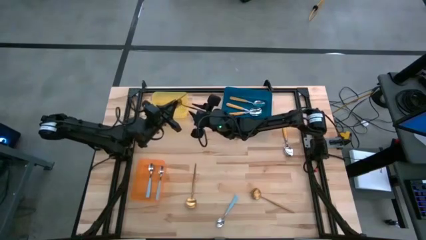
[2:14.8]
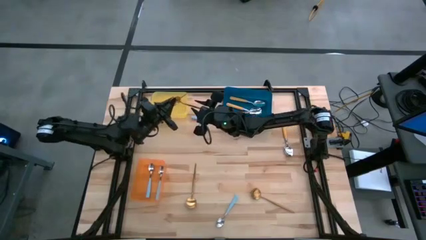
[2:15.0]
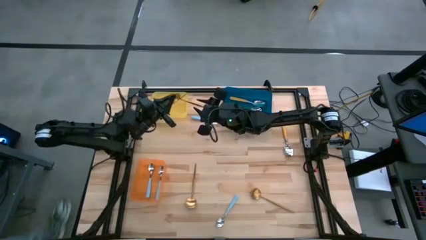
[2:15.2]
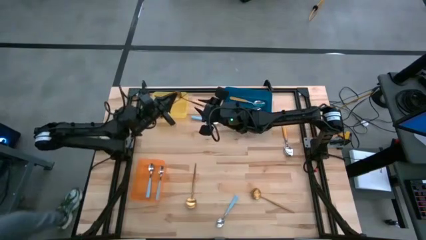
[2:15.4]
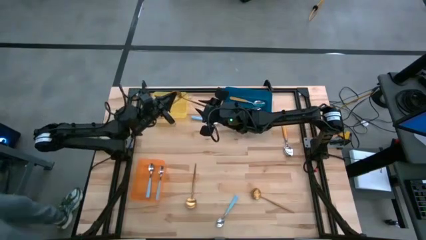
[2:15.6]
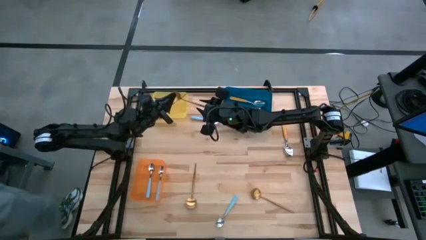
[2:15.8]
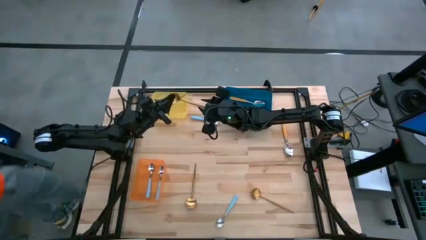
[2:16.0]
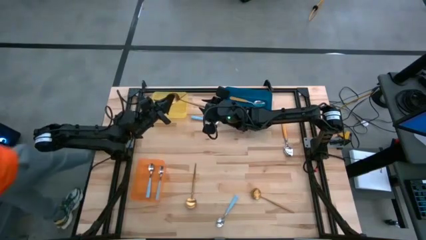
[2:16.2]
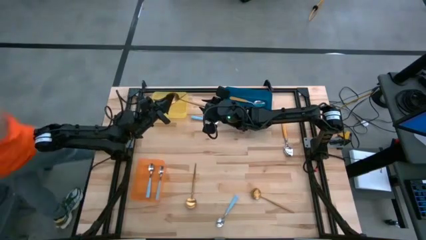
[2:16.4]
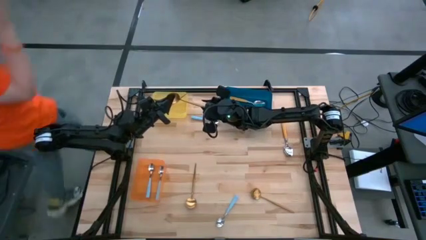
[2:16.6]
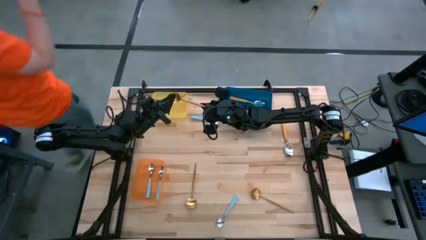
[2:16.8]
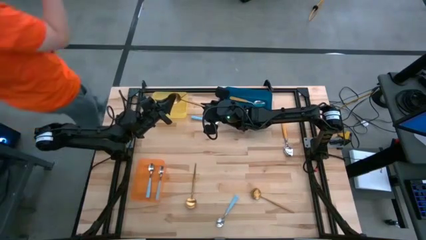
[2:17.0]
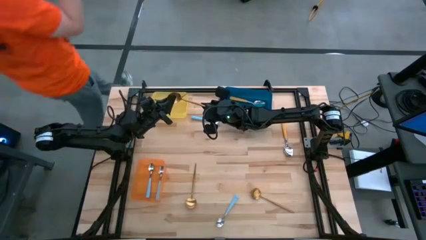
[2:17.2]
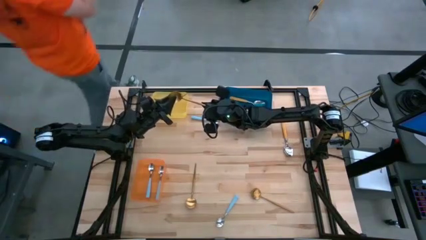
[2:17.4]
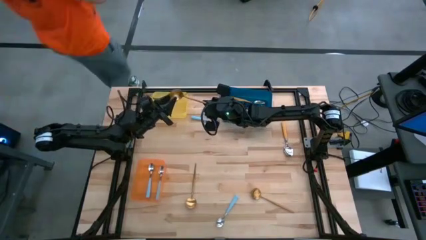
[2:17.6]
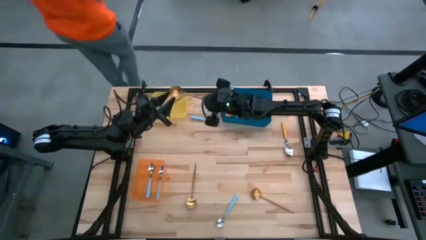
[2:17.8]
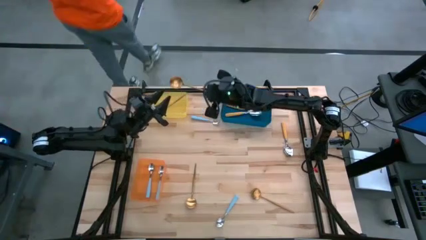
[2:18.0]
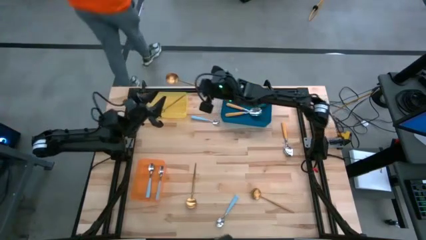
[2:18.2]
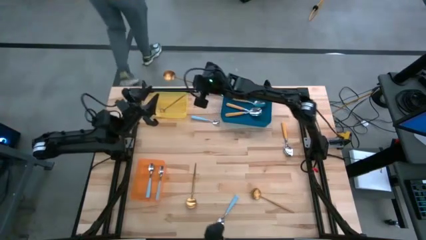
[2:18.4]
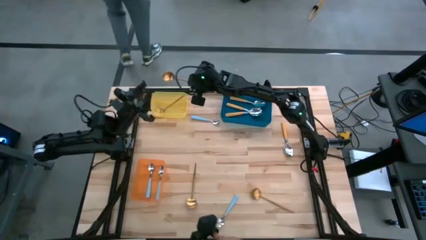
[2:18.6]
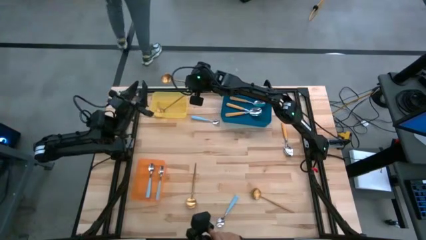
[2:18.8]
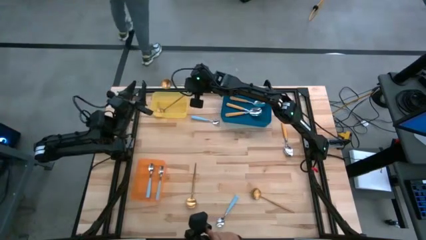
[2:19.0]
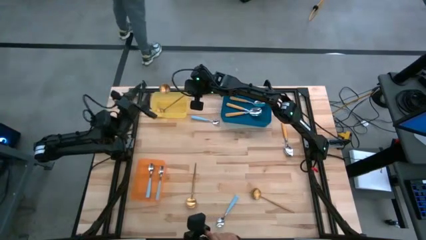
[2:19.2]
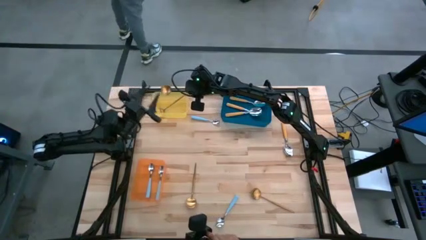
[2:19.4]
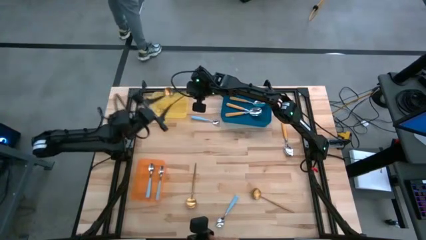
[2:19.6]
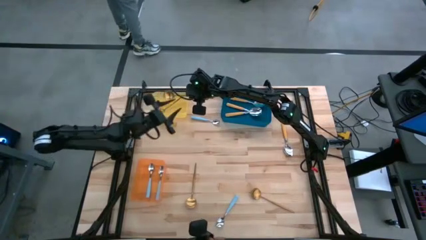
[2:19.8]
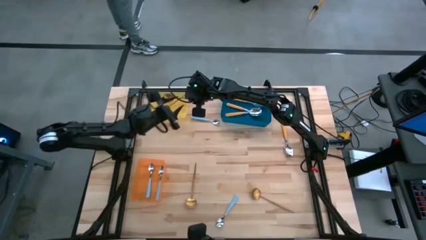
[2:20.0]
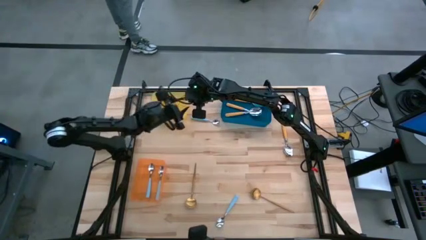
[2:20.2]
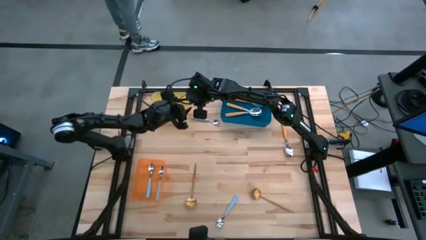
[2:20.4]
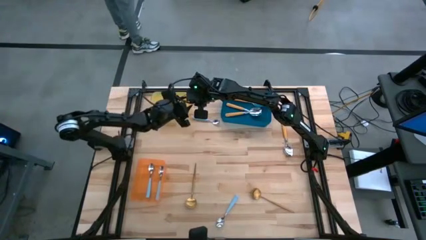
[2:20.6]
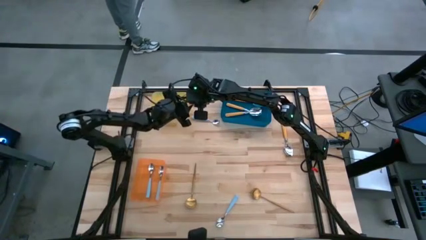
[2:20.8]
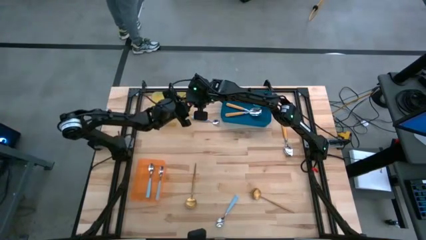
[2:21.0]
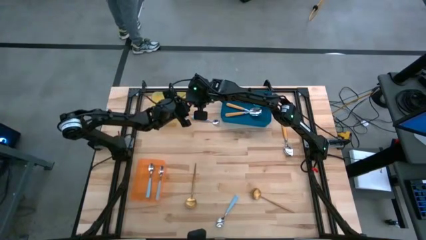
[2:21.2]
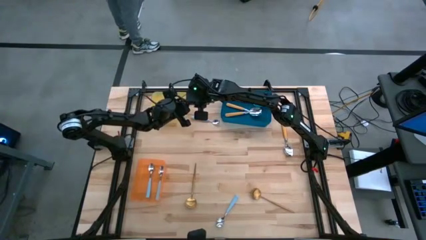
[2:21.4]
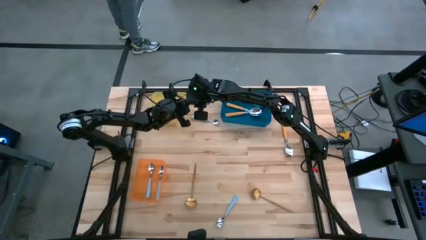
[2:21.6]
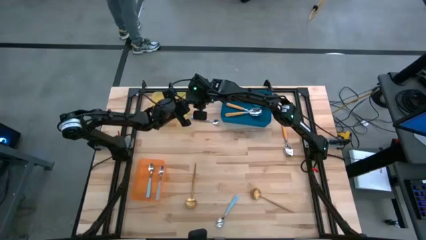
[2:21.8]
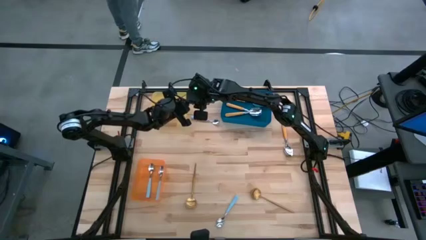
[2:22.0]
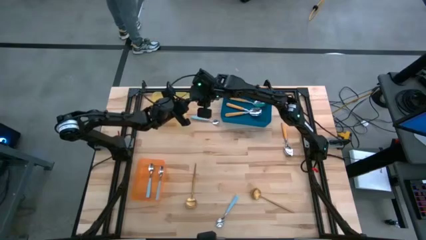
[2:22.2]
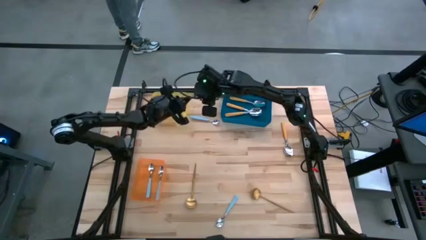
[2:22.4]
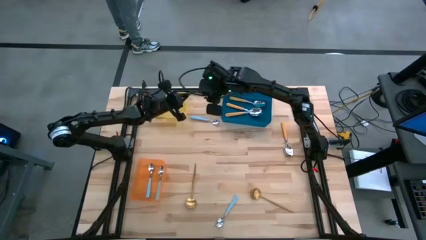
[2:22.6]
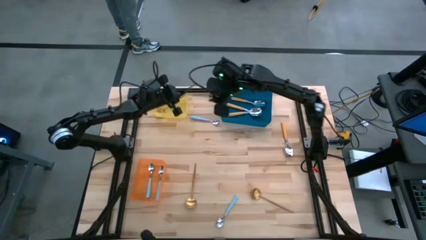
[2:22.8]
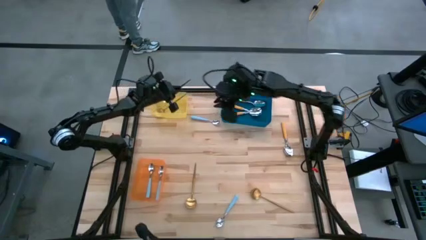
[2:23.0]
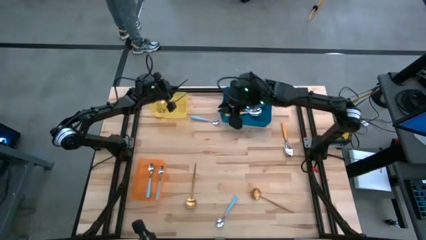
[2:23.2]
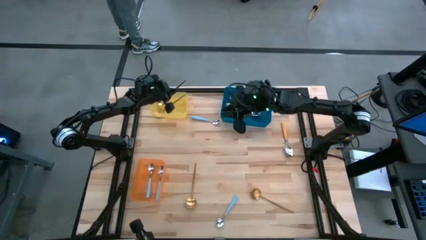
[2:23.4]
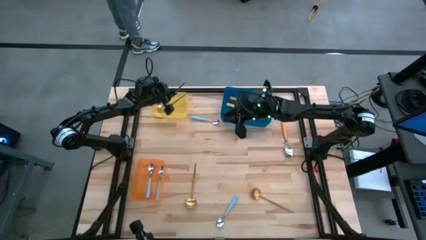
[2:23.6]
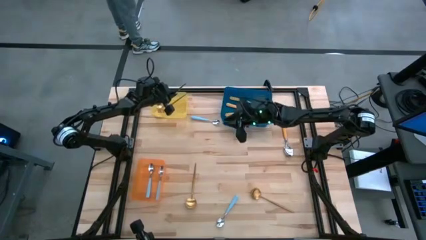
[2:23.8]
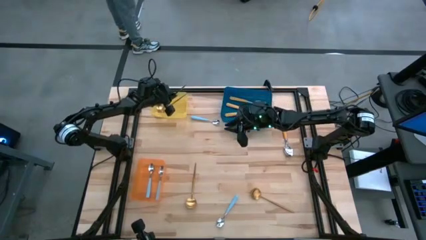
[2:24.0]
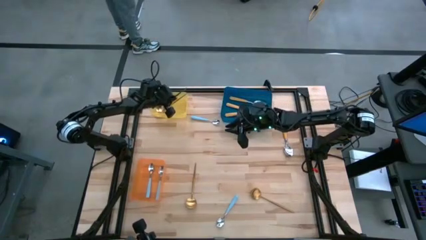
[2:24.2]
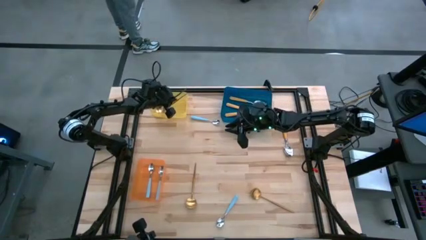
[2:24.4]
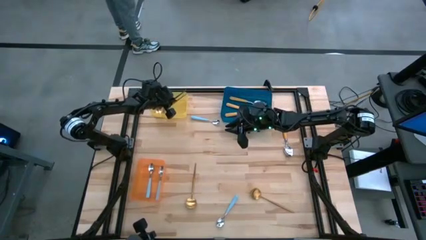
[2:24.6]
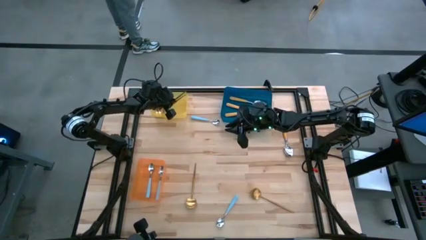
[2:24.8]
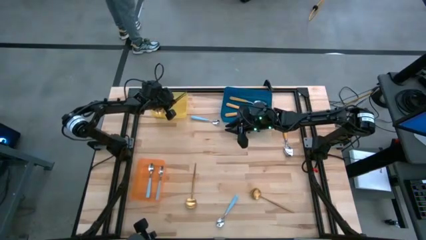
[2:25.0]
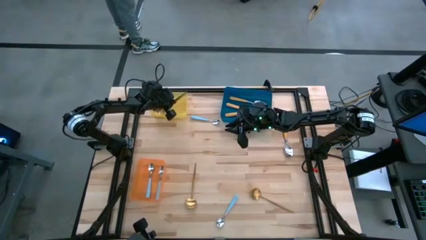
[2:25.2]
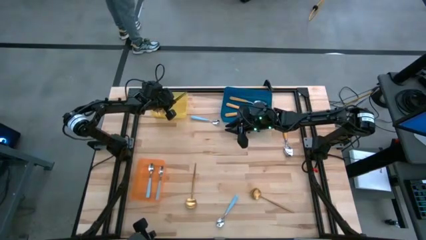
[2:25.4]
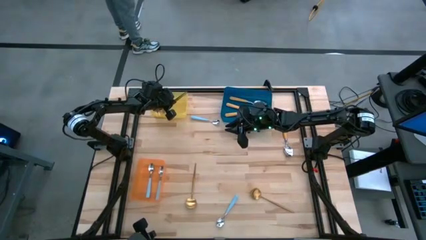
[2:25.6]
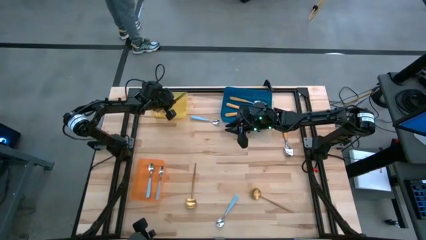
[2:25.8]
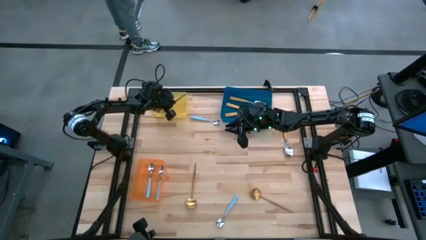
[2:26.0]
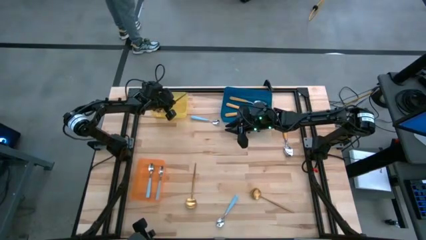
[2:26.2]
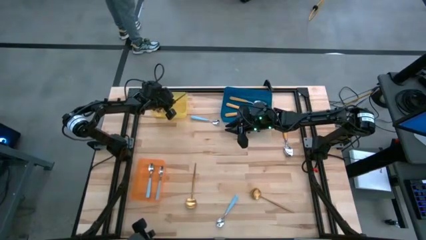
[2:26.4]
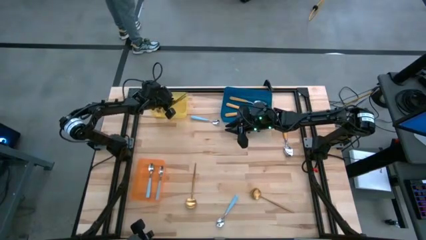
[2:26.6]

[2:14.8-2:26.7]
Task: Sort silverware by color (type)
Put the gold spoon into the yellow bin

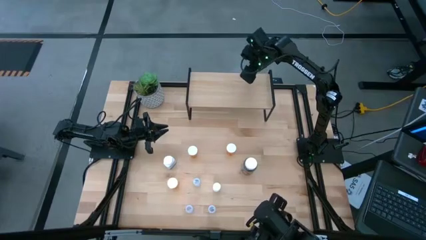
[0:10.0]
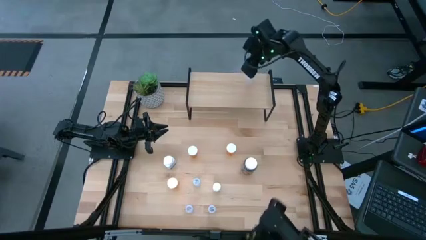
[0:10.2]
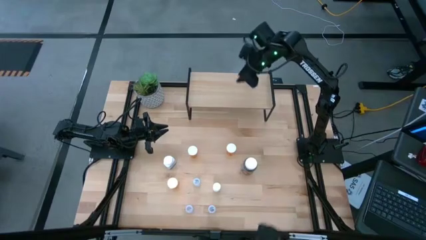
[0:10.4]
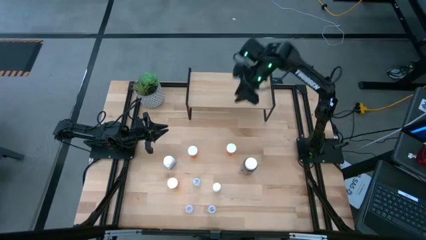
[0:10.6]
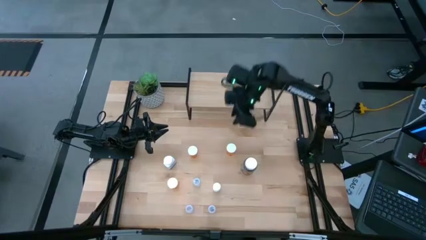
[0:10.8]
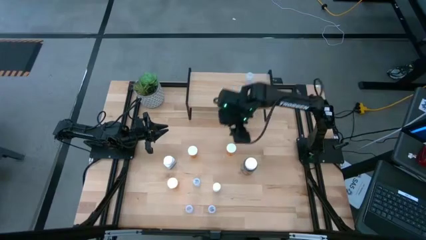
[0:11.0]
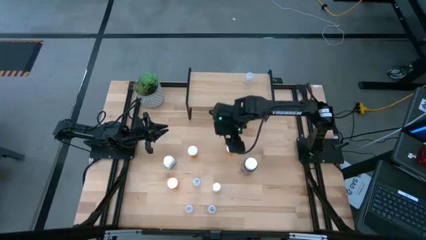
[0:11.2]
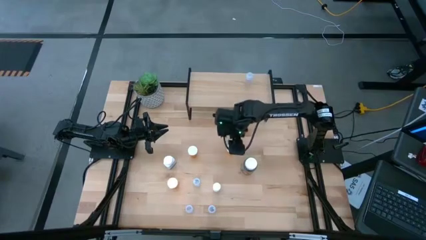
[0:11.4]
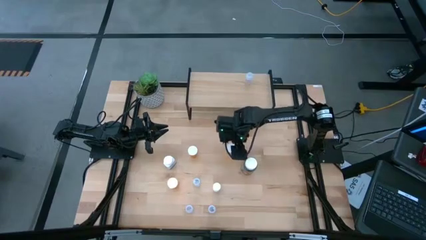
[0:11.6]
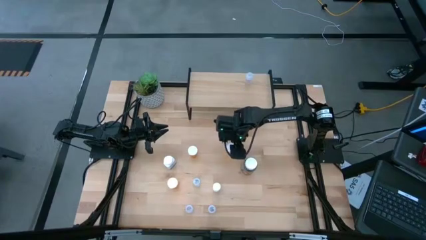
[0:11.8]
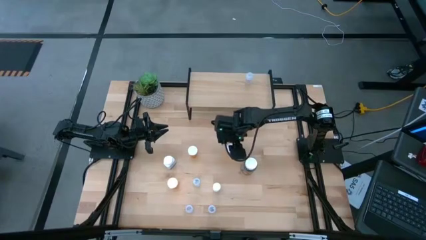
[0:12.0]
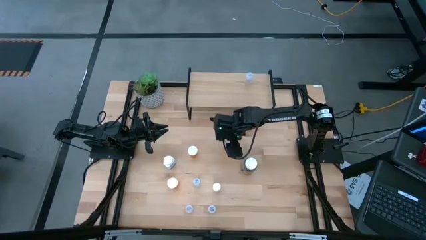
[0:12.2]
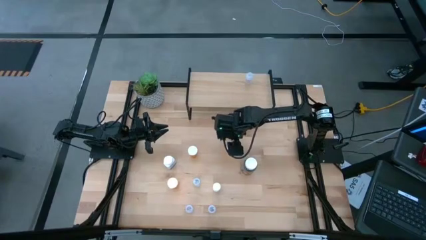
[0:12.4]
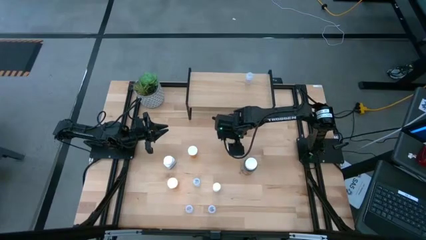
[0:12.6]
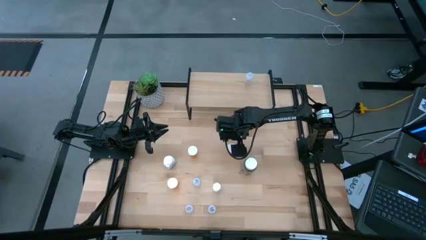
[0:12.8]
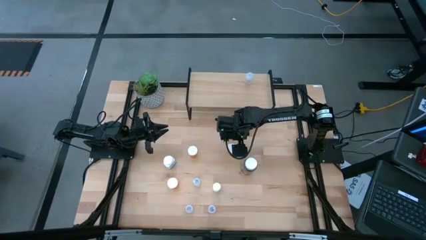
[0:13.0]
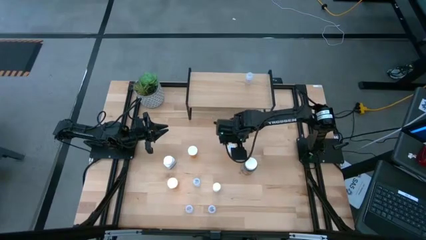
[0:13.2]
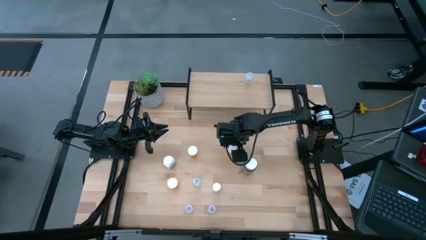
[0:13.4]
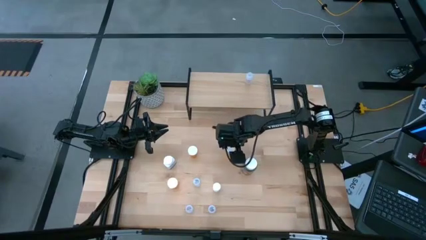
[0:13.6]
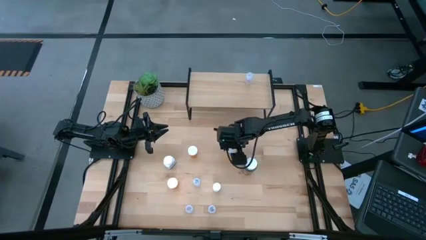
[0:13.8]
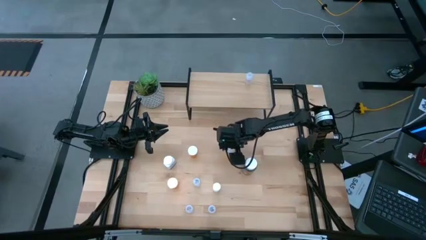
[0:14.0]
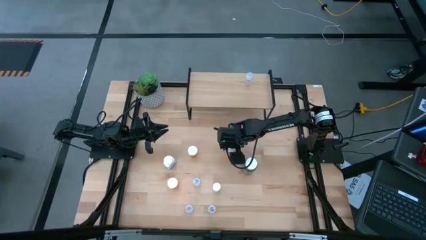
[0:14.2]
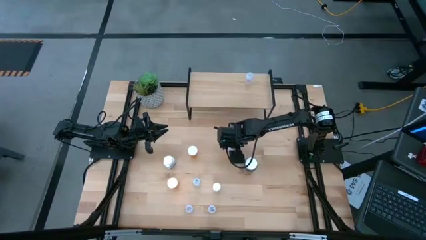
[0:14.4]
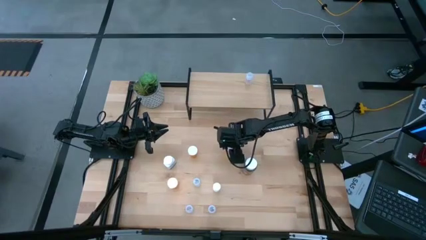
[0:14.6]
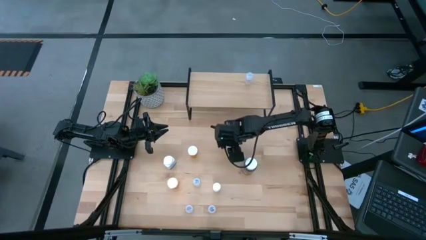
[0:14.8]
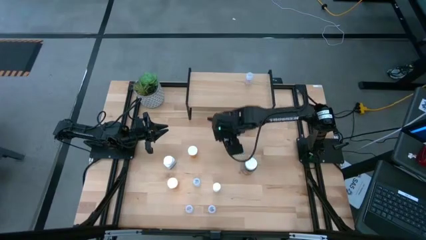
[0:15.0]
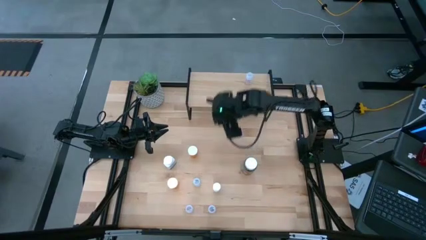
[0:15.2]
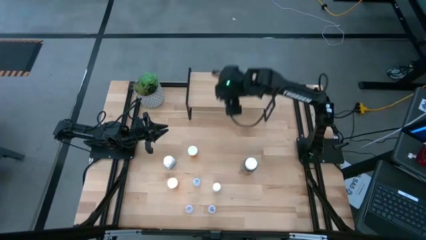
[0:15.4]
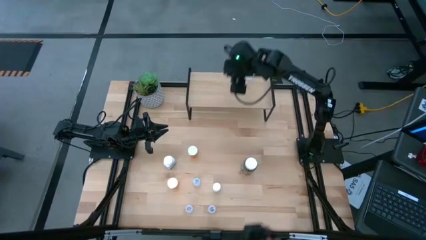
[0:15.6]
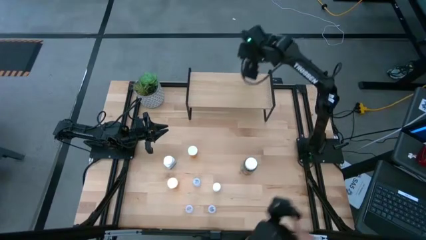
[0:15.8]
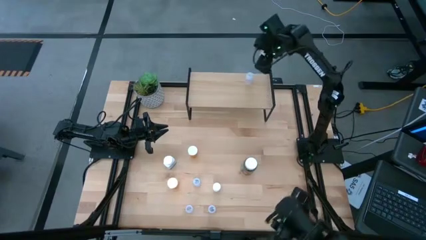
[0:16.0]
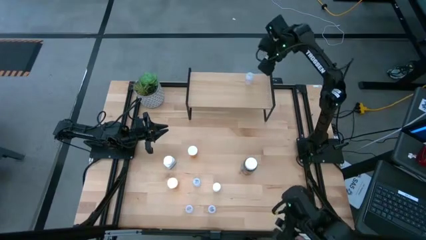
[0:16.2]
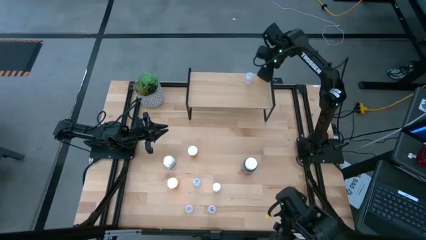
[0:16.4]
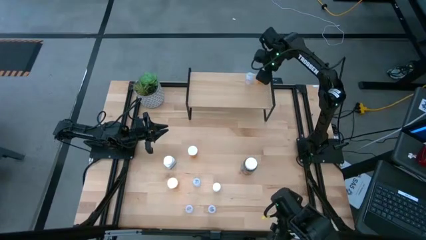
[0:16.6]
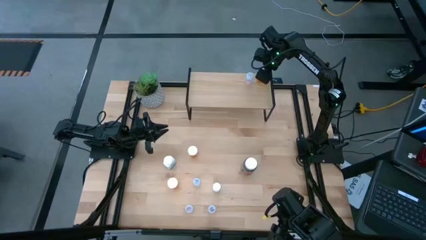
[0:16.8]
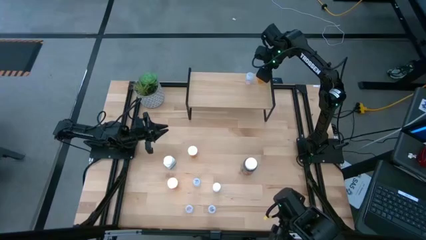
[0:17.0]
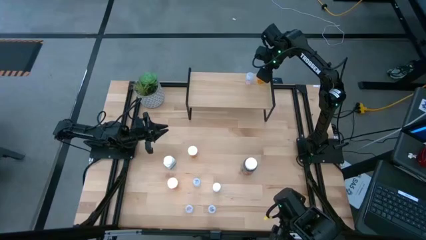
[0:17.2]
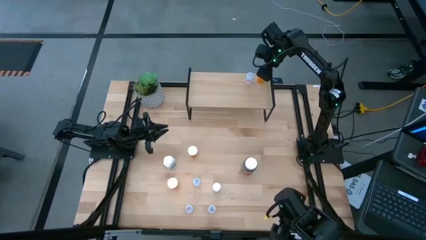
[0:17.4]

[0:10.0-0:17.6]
Task: Pick and place medicine bottles onto shelf by color
Put the orange pill bottle on the shelf
